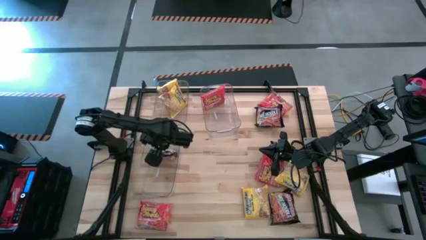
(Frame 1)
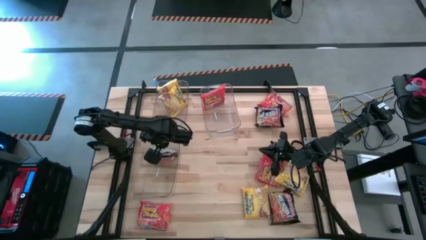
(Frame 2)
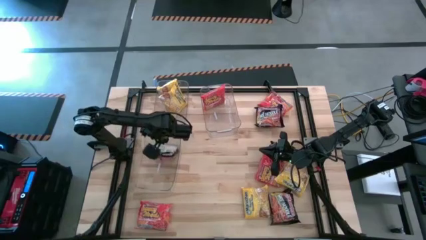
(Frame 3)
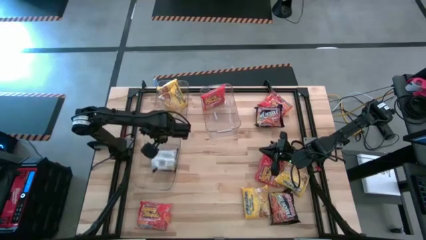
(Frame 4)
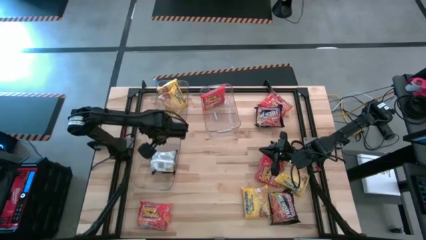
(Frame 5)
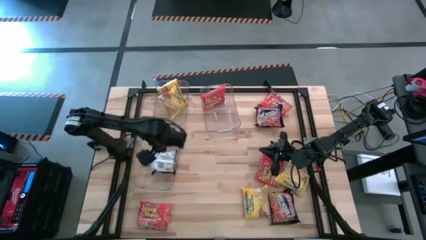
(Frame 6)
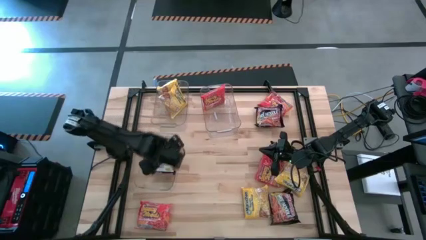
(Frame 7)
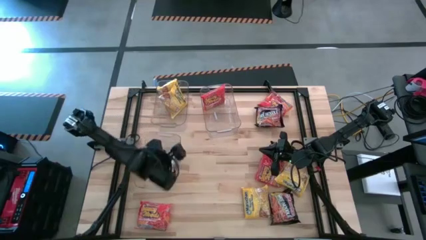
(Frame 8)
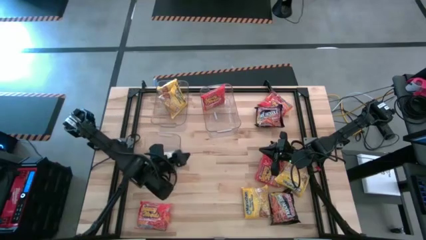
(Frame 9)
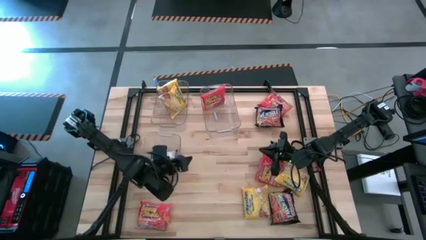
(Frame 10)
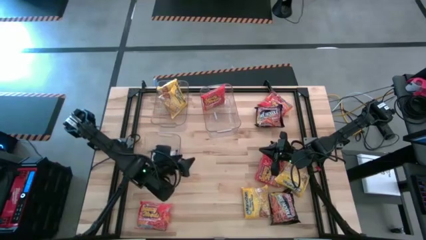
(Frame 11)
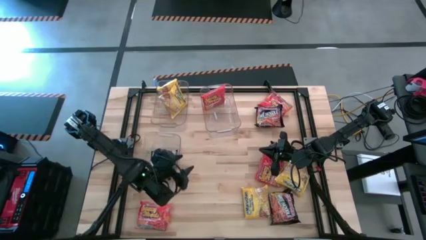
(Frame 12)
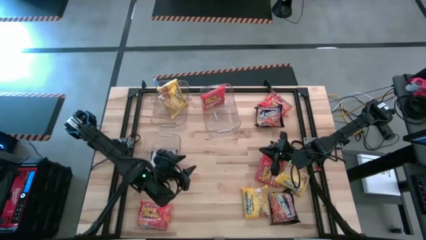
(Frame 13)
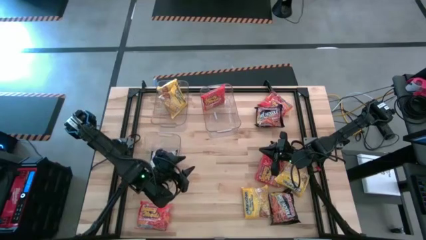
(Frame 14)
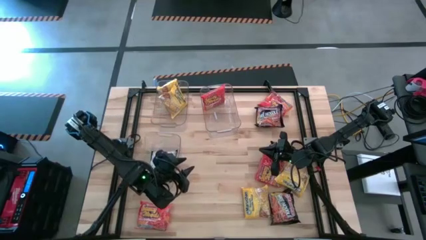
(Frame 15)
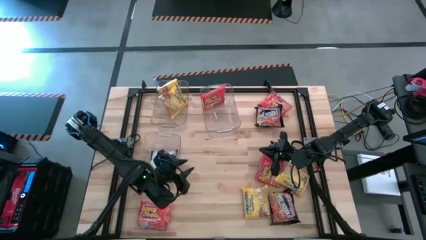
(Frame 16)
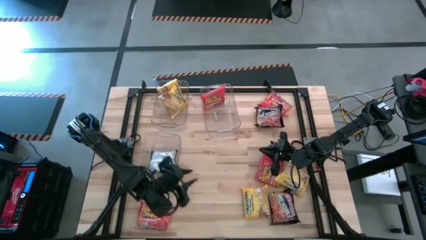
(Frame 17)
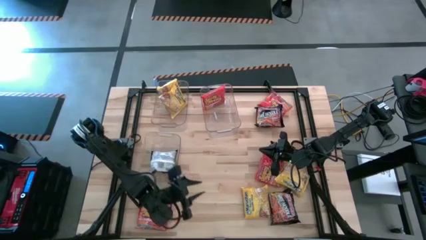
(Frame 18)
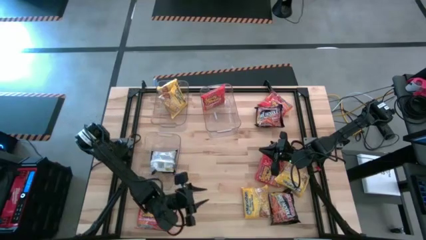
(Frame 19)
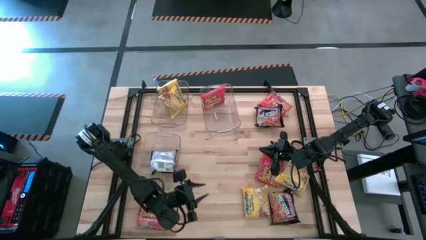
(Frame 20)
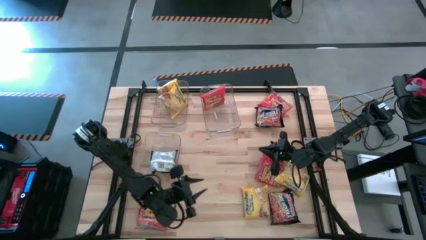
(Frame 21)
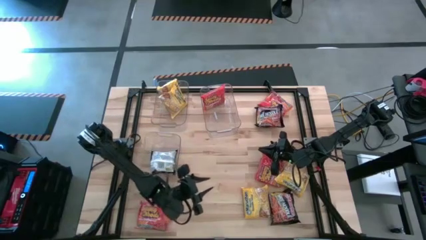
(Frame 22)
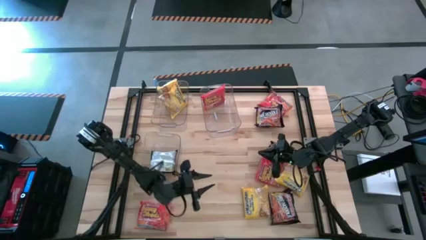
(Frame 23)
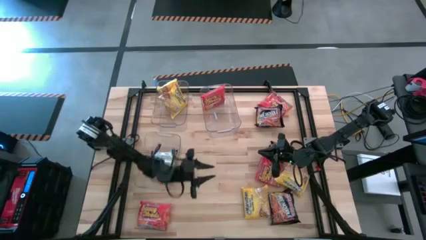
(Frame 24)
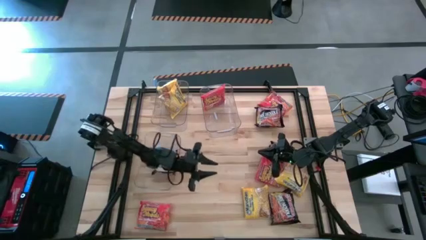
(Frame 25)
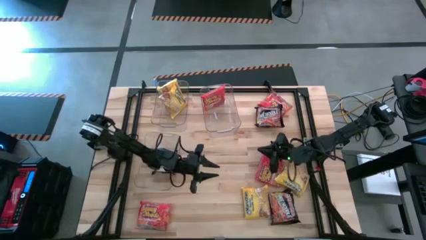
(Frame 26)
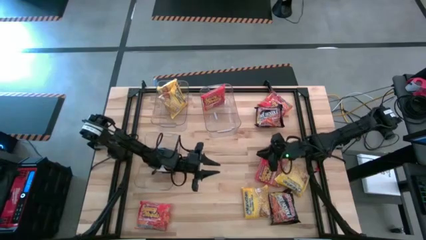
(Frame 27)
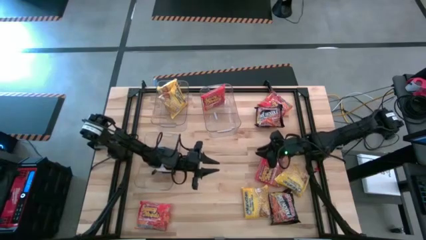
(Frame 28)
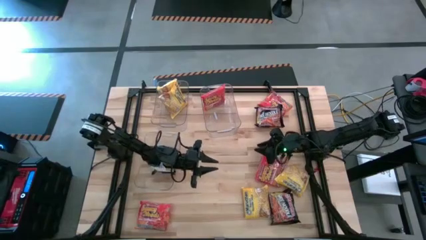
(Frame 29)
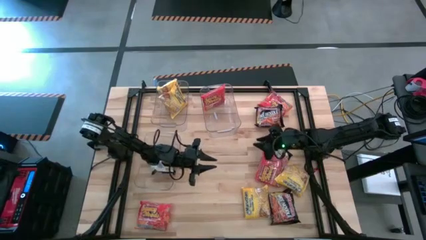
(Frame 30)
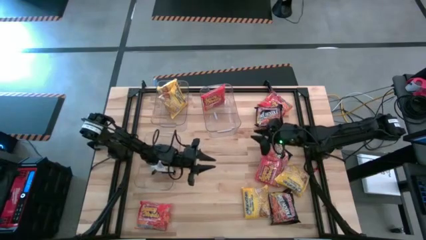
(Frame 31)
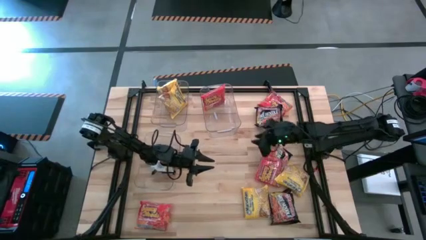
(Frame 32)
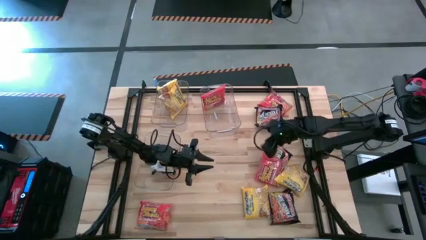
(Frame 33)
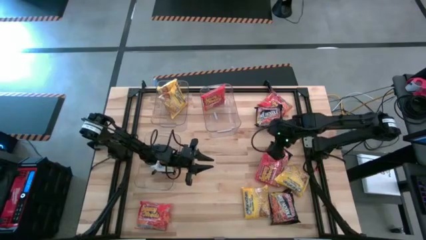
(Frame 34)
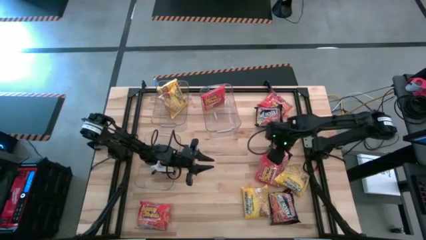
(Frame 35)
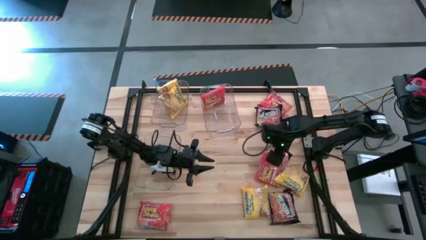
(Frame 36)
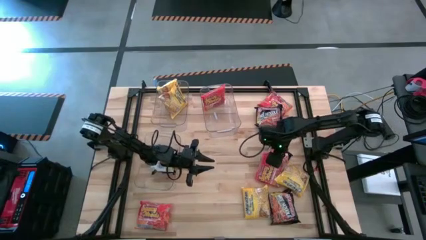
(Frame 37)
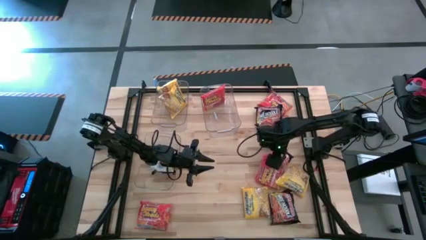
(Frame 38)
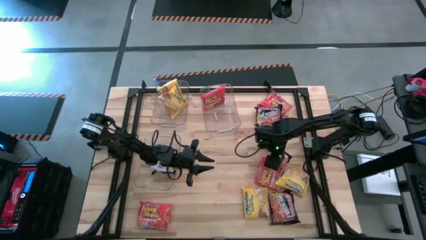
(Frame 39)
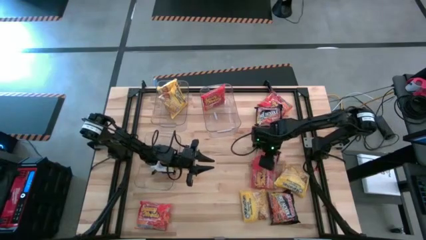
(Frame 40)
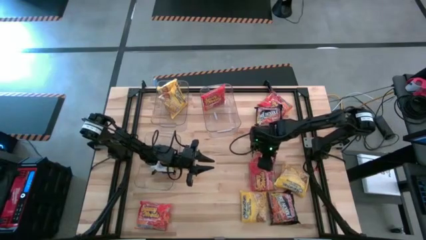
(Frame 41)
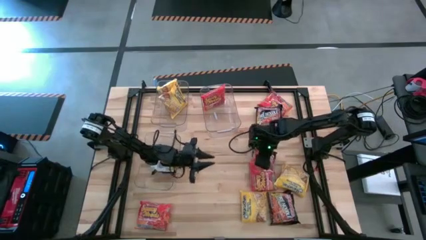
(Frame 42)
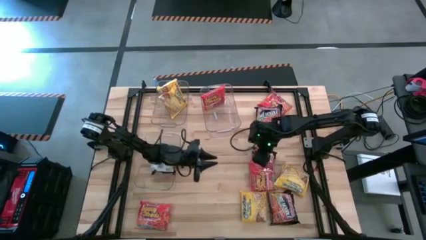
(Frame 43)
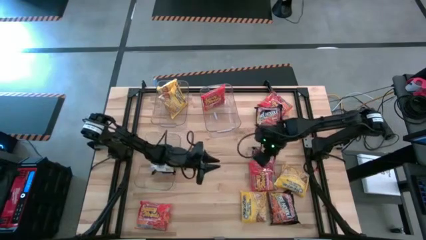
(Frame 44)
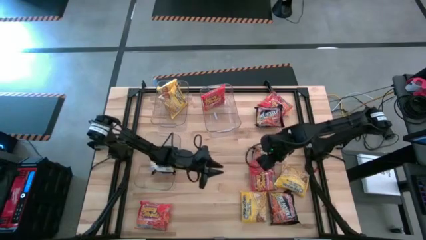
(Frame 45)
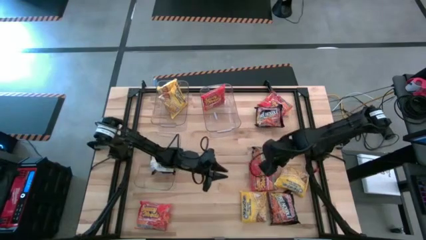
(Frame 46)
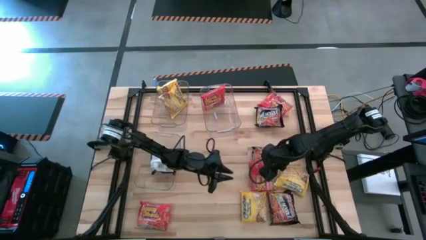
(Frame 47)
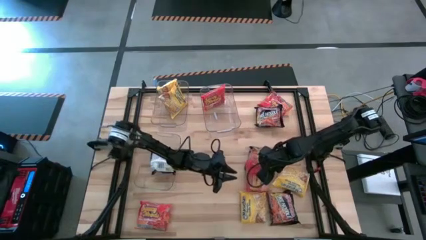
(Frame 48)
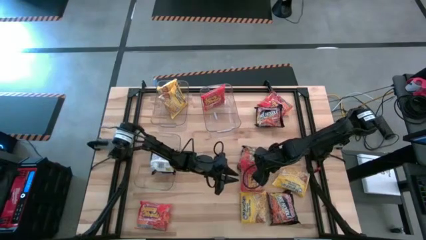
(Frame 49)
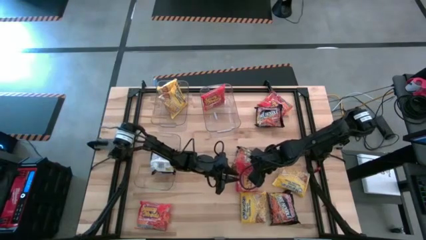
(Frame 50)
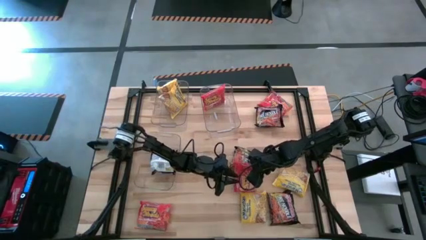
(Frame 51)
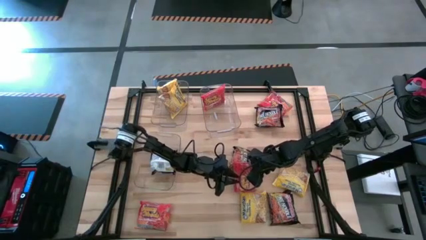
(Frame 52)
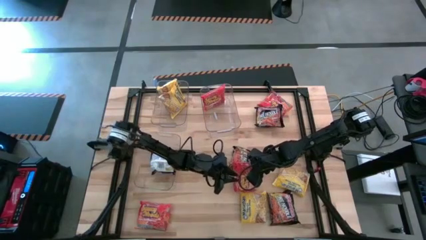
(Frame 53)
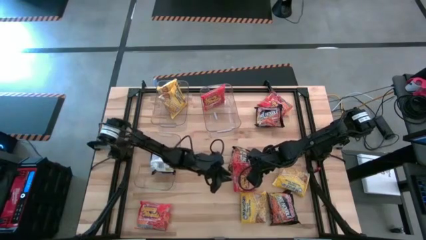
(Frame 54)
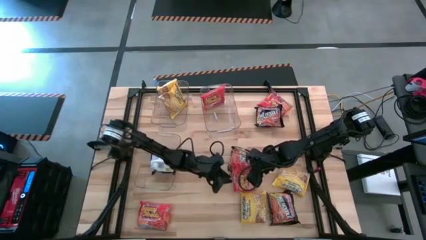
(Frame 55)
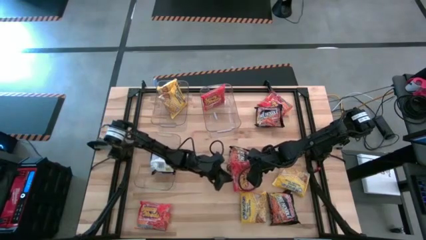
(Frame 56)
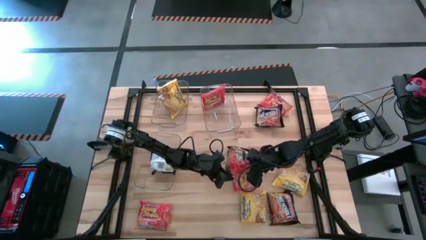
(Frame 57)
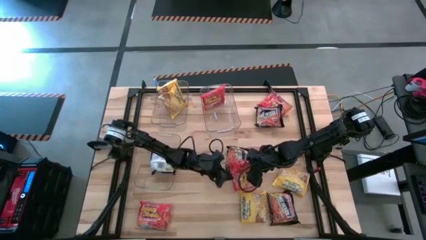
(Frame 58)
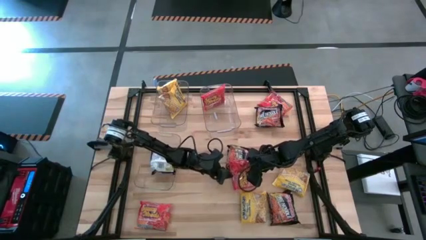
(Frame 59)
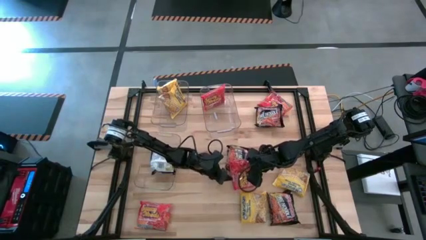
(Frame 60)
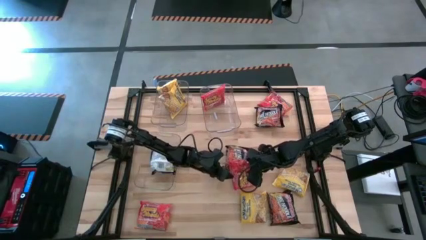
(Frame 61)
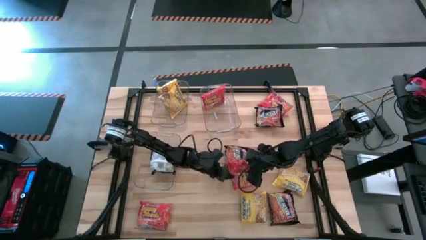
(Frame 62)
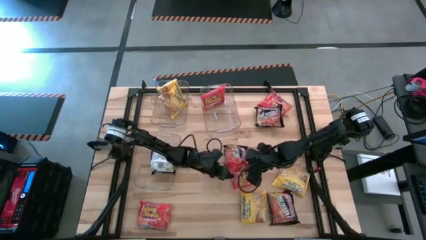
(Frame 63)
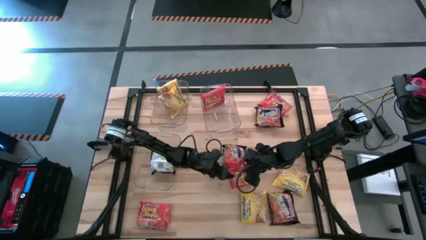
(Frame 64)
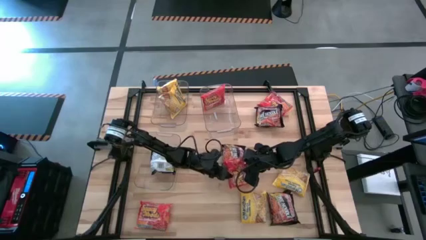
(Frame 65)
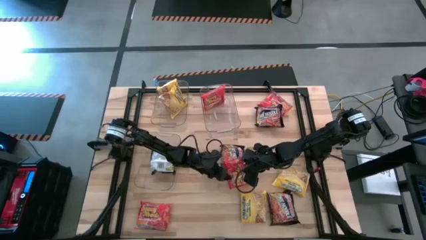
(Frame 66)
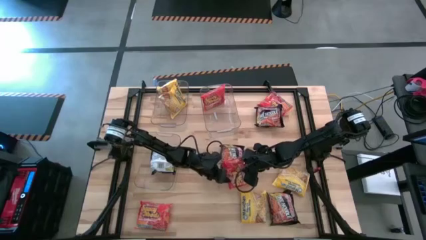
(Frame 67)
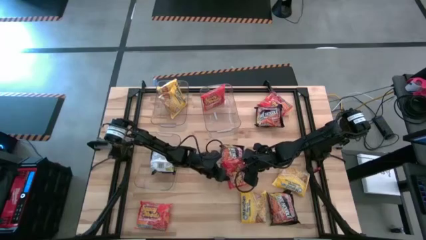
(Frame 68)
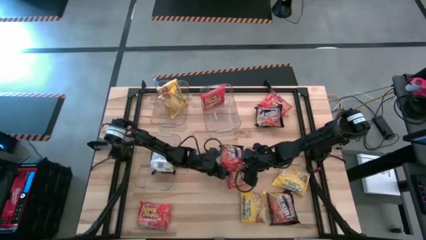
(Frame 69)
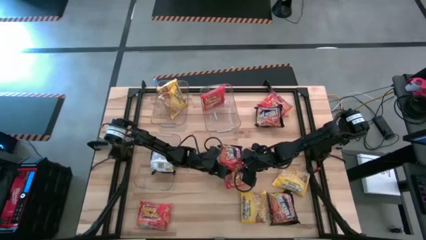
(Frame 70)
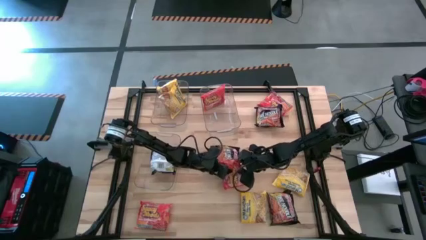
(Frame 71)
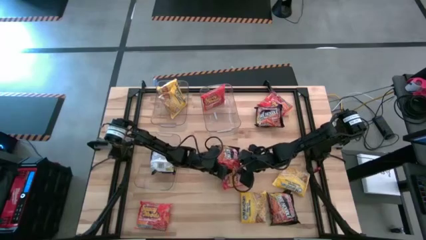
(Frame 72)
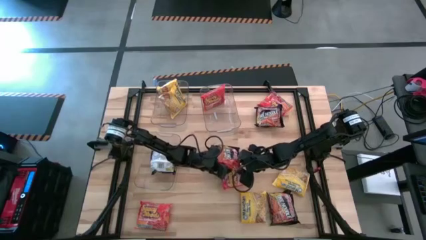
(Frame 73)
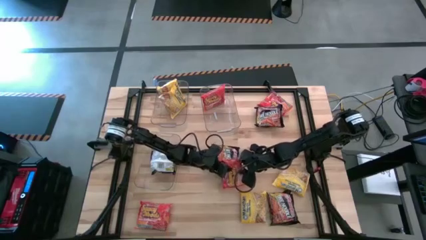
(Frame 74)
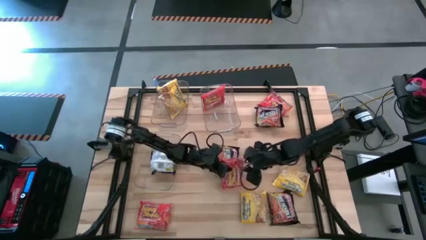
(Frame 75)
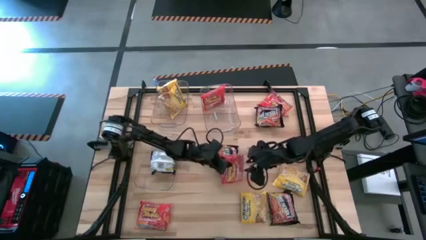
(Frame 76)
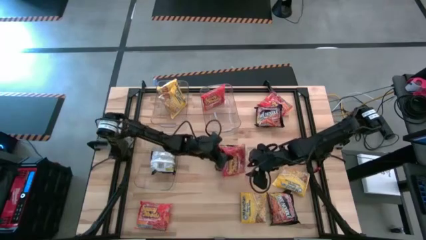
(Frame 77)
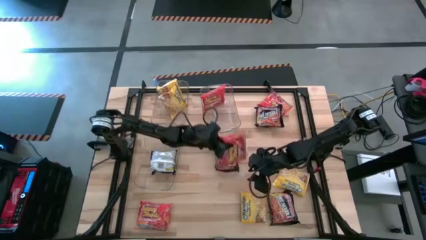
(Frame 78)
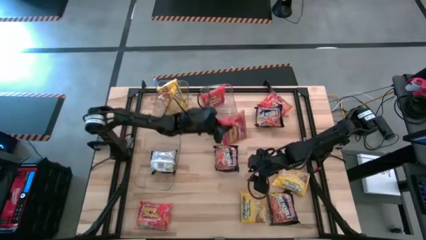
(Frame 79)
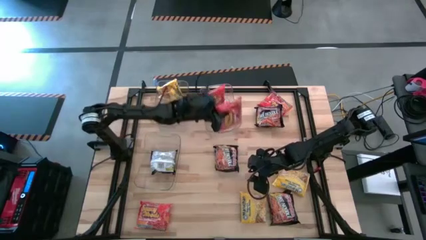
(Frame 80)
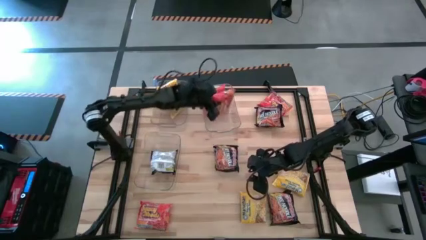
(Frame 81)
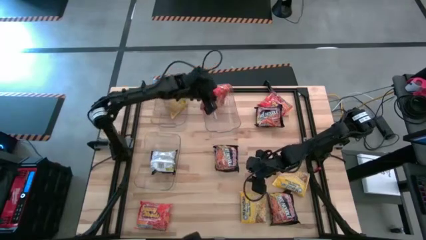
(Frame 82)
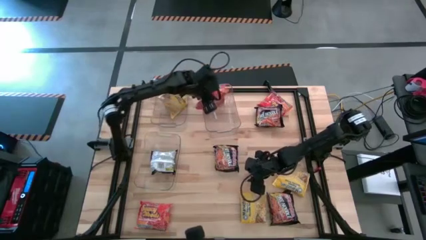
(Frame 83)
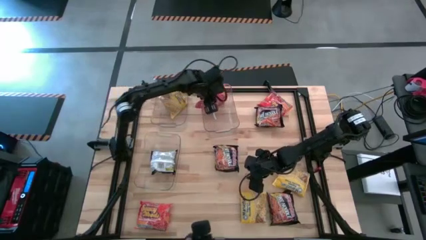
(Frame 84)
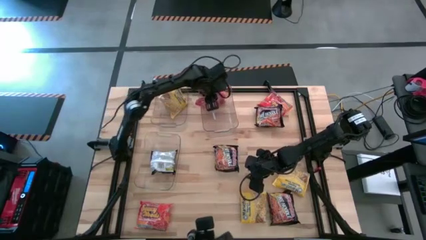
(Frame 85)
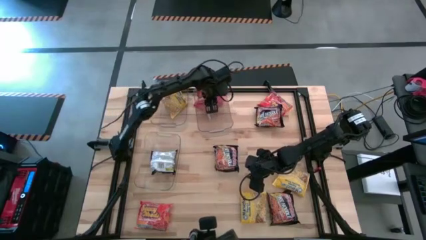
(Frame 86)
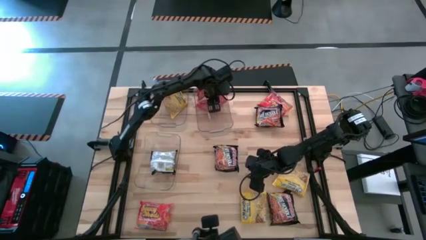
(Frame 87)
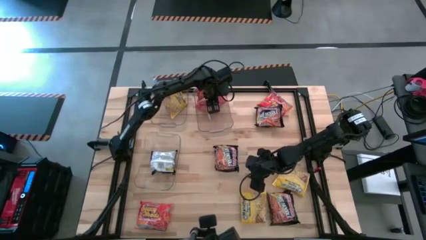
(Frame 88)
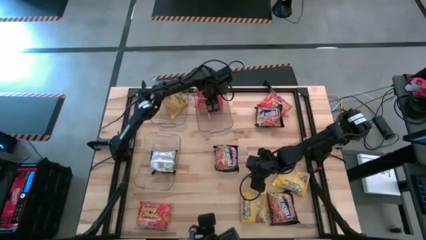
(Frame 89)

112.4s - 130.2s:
Task: Sort Maruchan noodles
Put the orange noodle pack into the top right transparent bin
